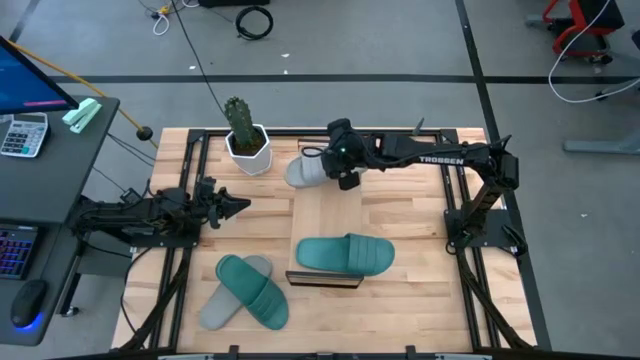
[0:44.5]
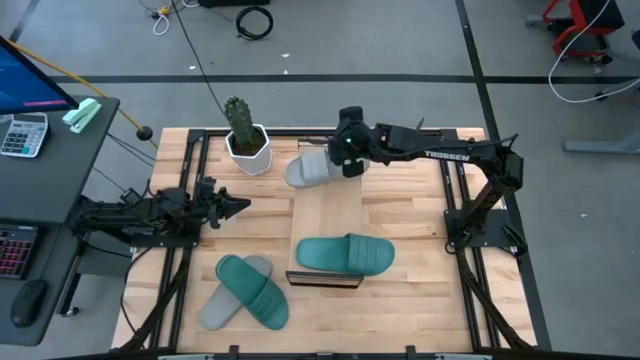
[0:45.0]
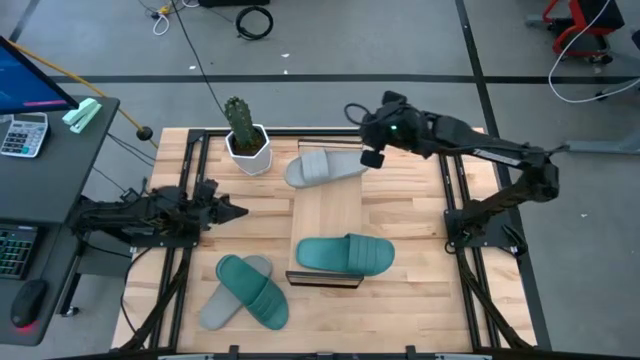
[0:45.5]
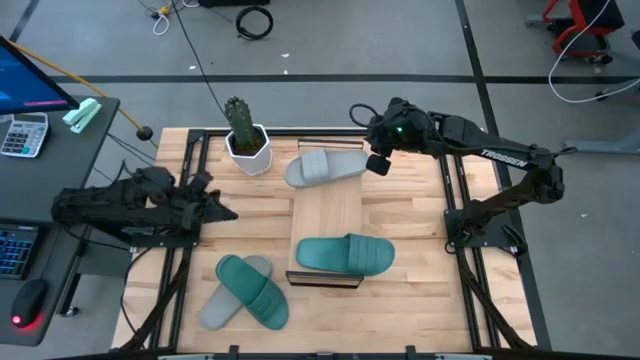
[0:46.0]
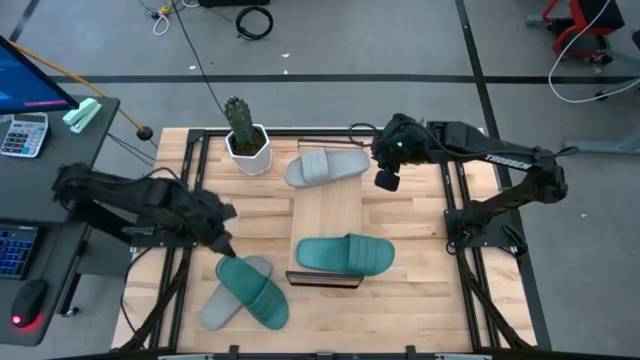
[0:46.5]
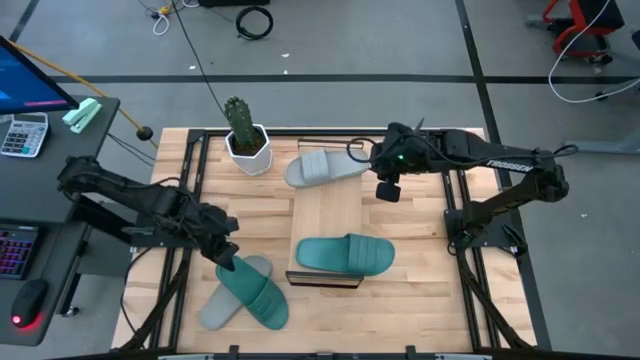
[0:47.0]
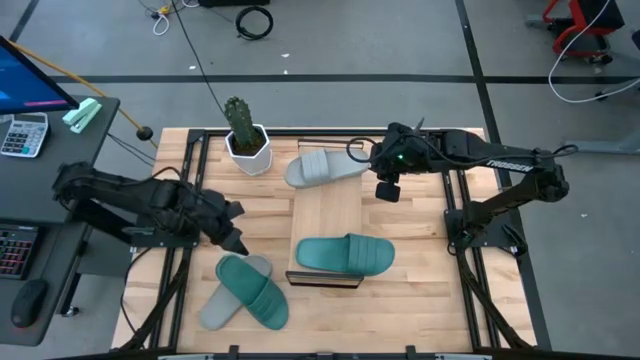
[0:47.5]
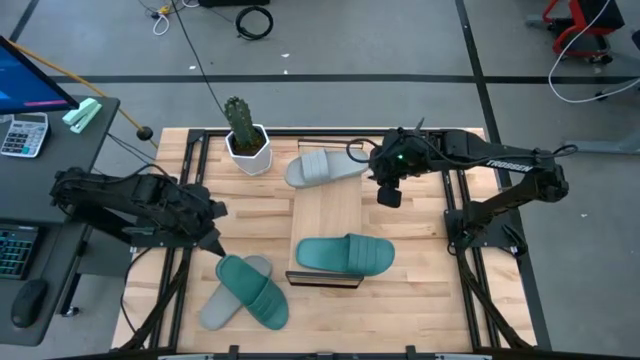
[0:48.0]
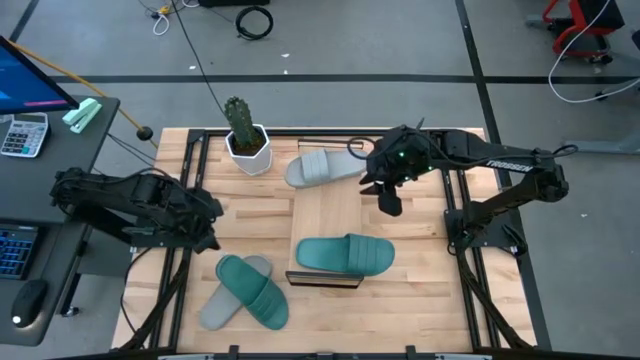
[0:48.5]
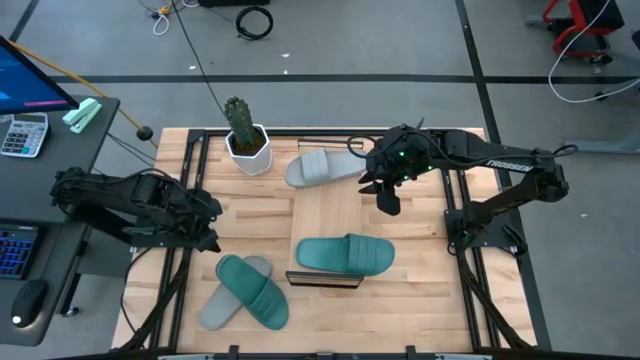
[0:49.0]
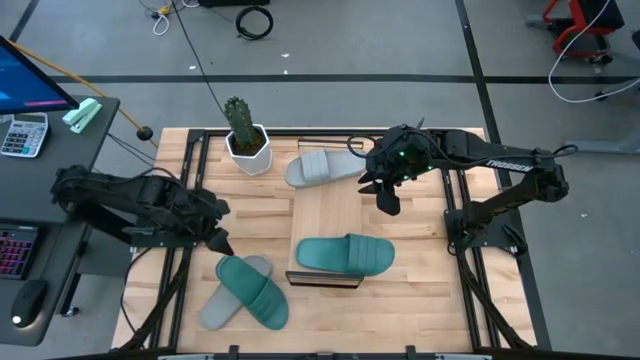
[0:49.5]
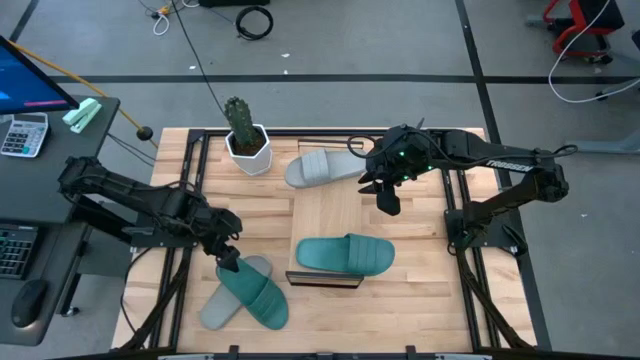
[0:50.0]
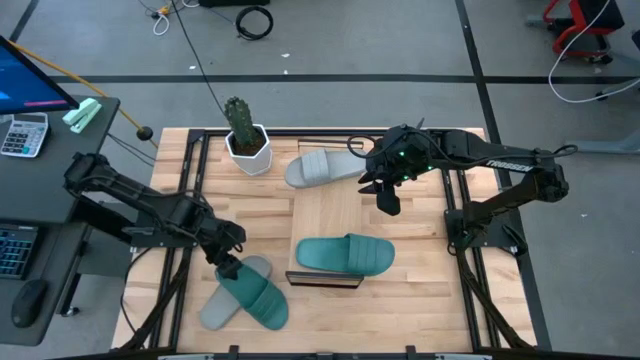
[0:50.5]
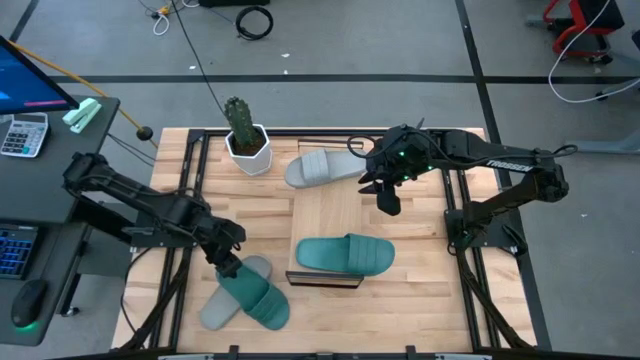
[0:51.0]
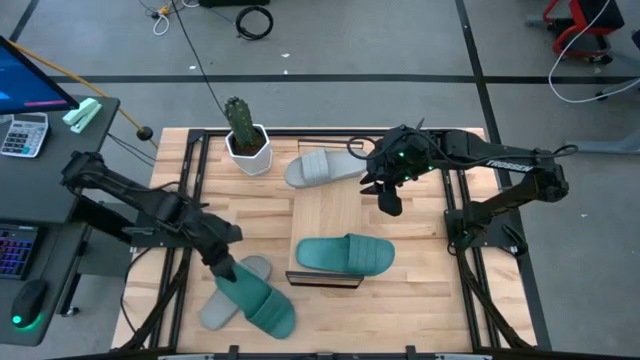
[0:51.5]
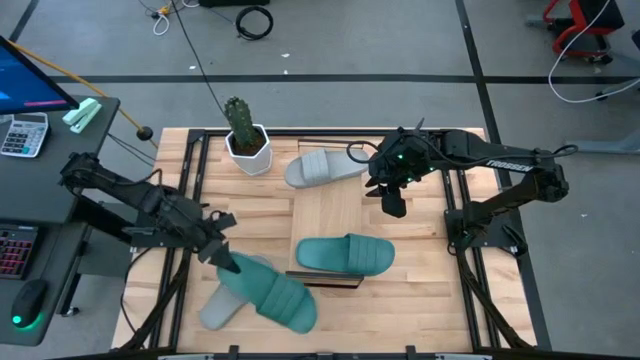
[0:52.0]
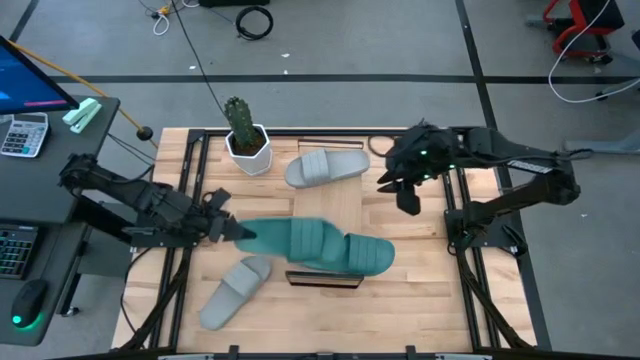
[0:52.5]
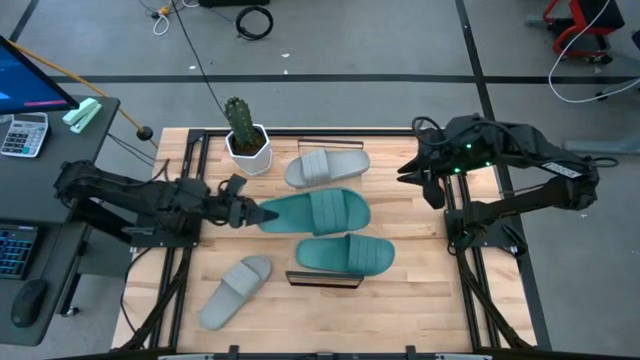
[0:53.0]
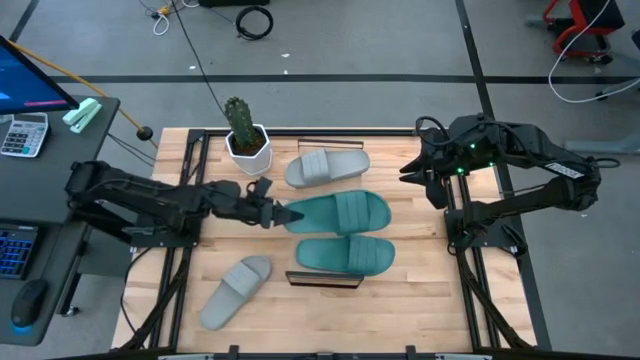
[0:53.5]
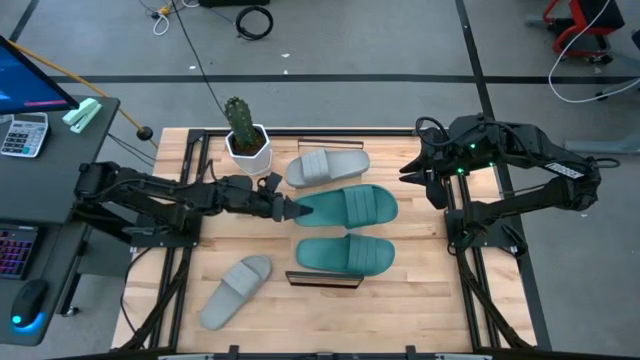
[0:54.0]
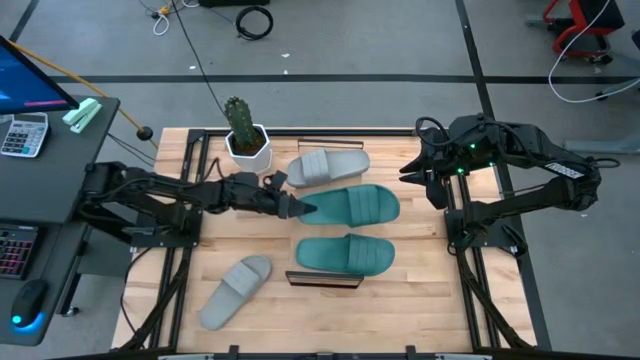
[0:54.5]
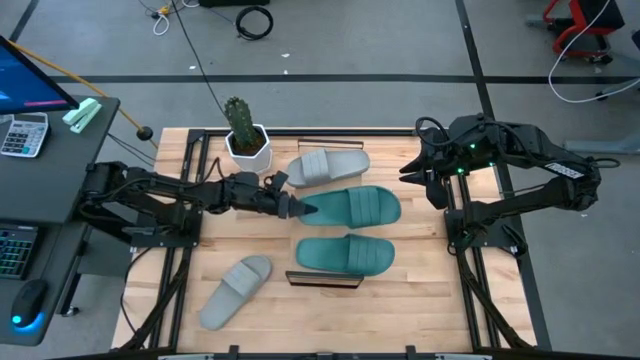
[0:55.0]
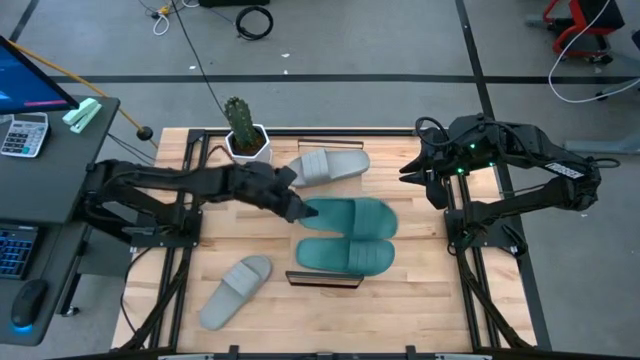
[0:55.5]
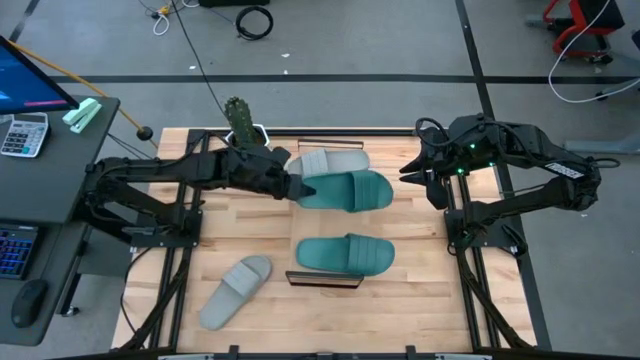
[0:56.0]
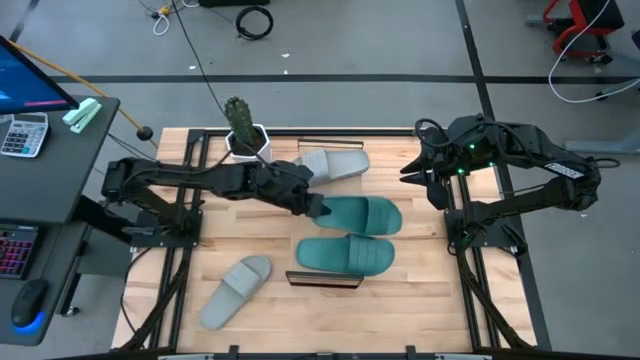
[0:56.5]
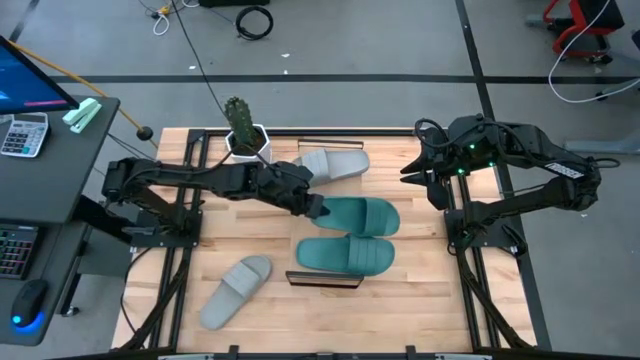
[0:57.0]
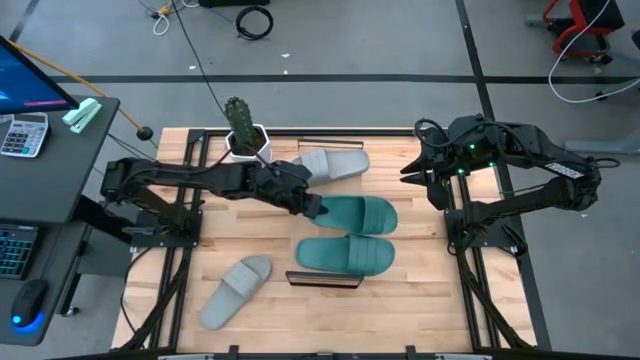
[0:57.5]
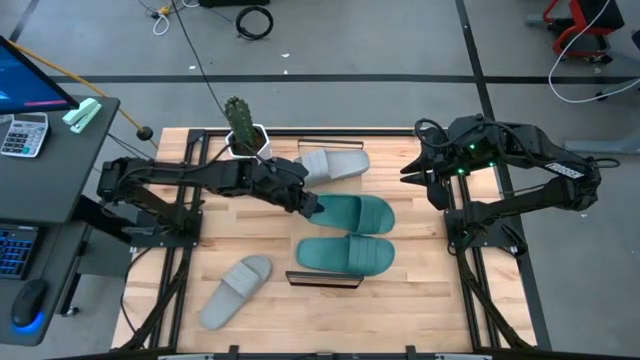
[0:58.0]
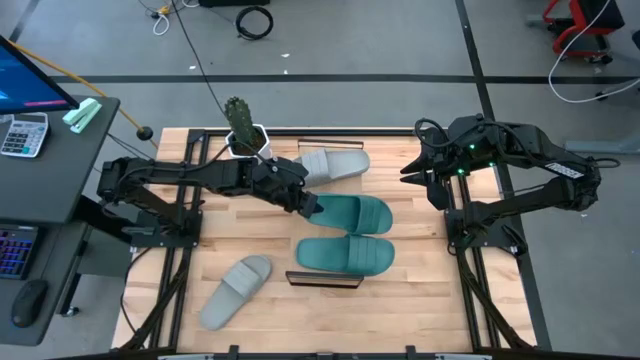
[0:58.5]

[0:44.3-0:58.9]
Task: Pick and place slides into the shelf
Put the blue slipper on the shelf

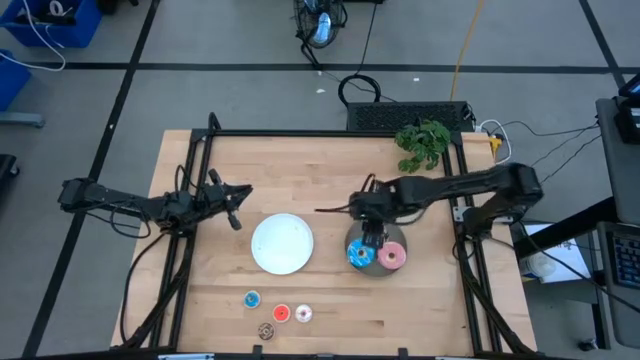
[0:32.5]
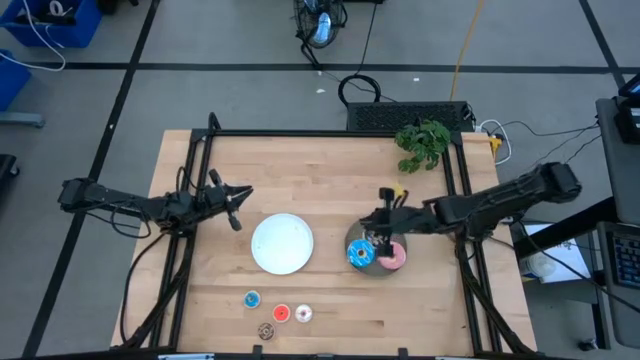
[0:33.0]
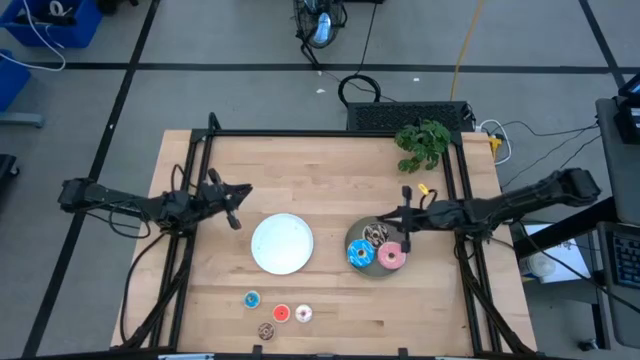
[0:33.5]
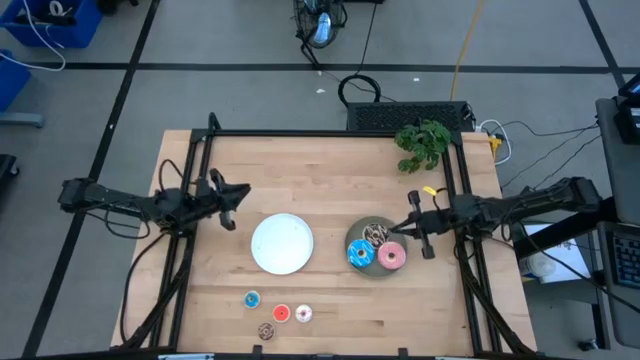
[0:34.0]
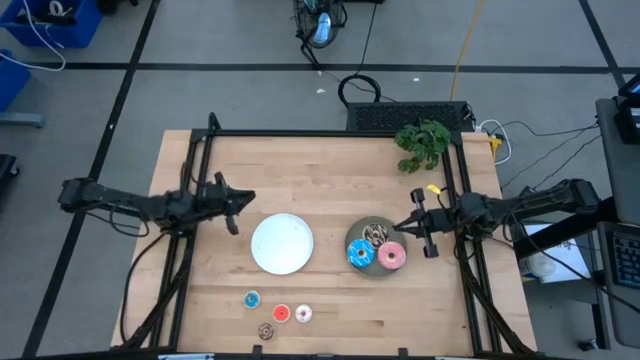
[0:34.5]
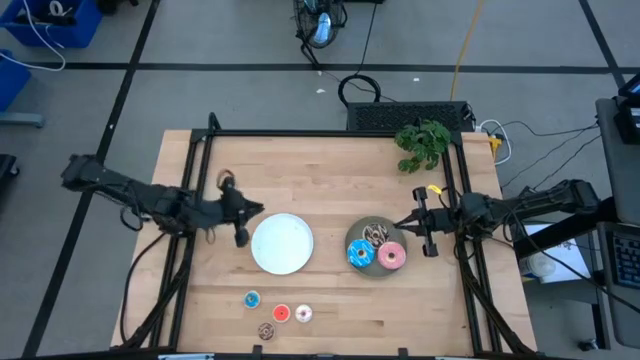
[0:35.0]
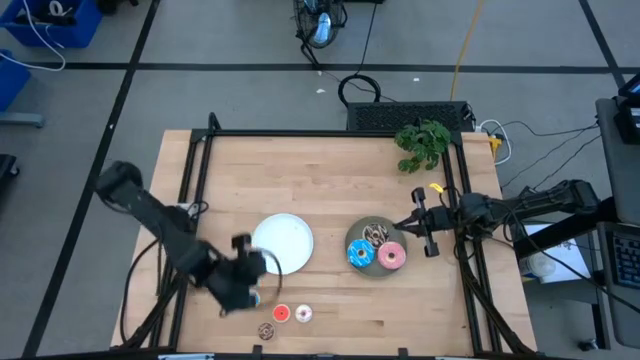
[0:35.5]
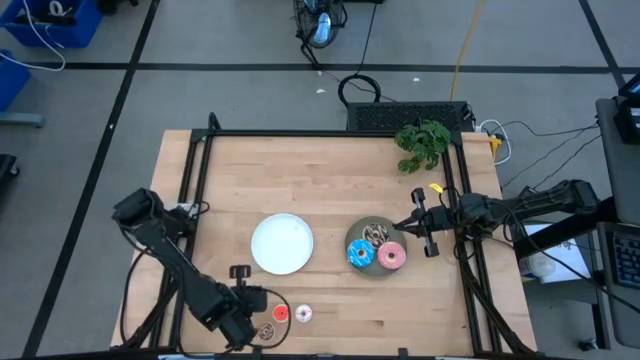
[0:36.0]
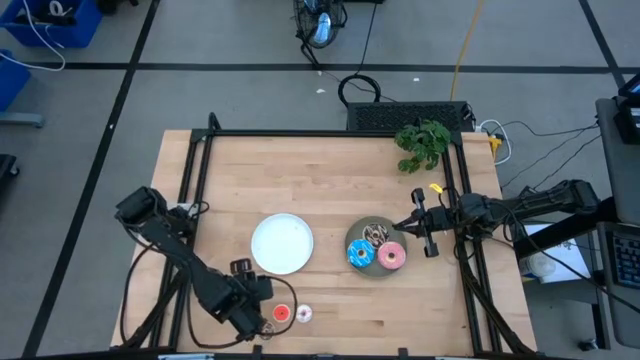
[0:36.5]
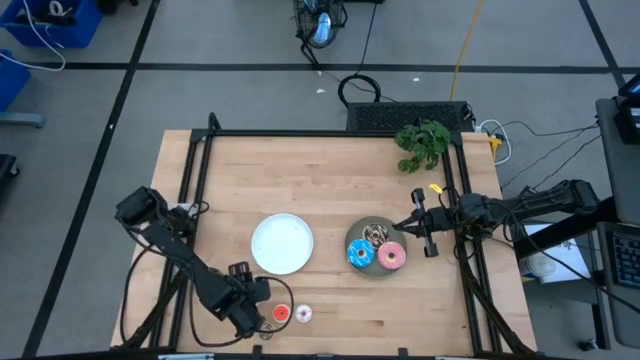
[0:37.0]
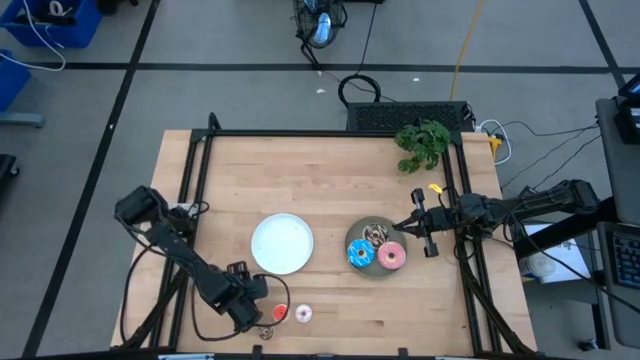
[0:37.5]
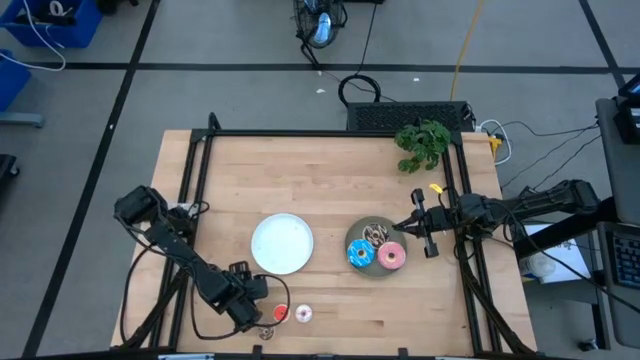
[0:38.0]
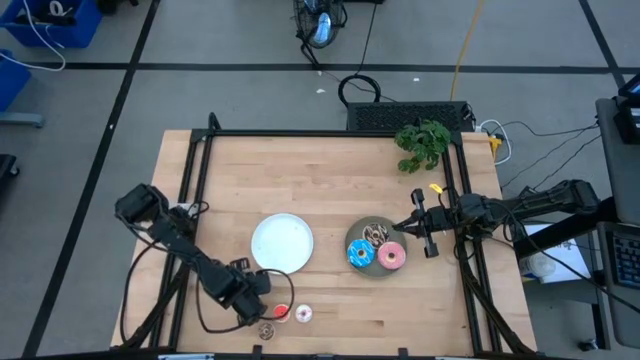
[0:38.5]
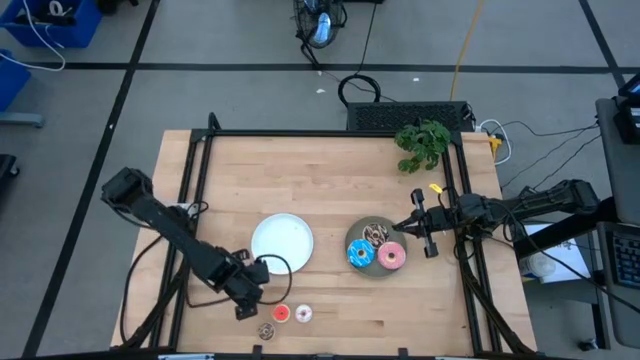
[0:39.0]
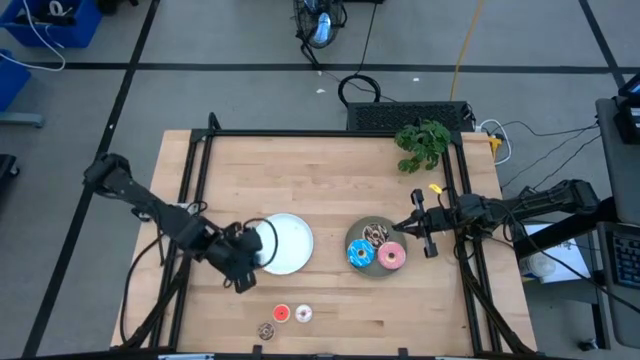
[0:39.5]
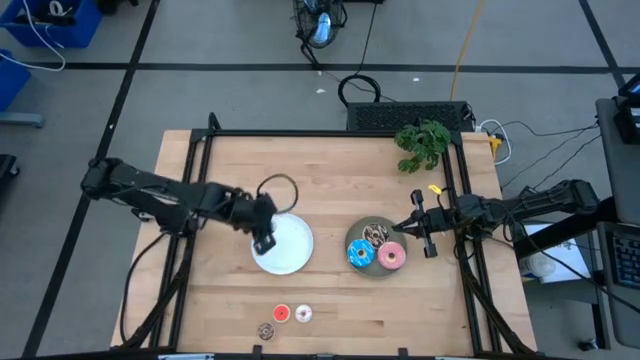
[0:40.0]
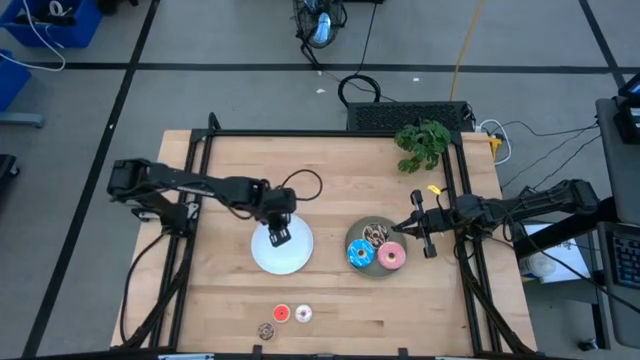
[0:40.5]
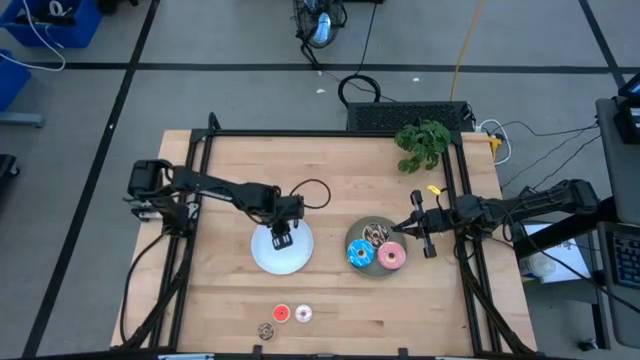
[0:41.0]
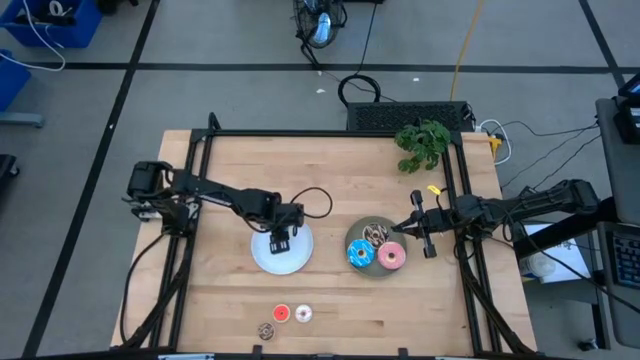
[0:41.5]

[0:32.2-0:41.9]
Task: Pick & Place donuts
Put the small blue donut on the white plate
